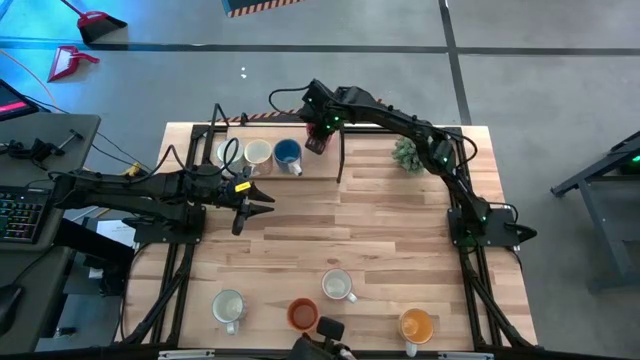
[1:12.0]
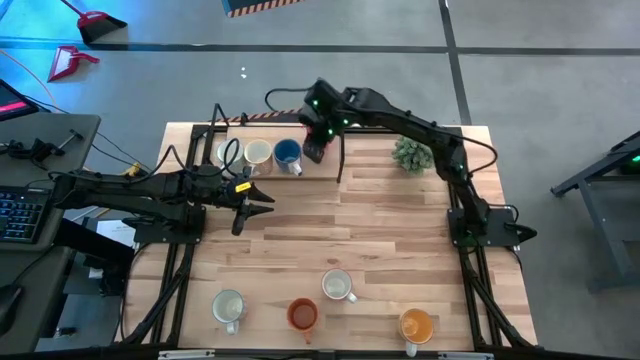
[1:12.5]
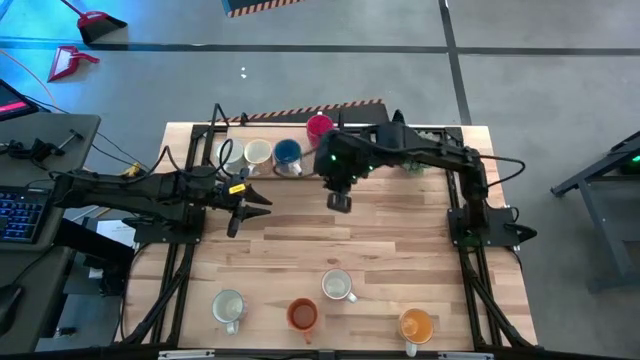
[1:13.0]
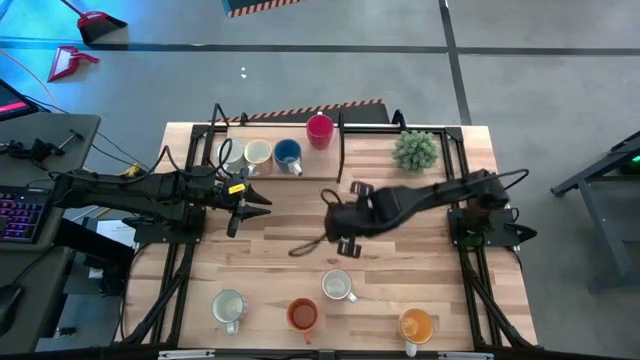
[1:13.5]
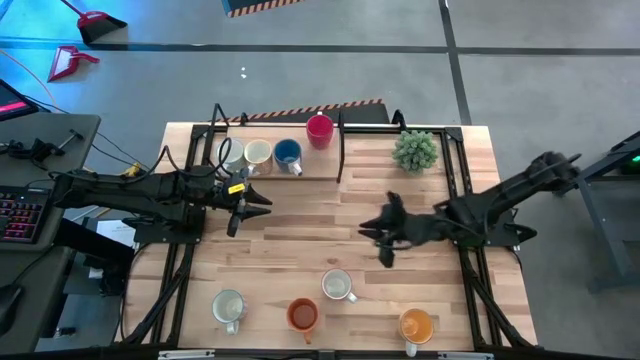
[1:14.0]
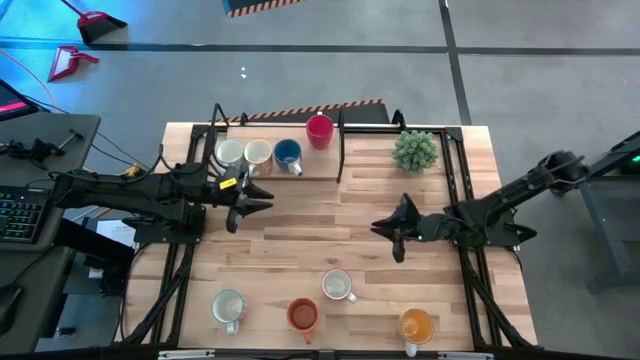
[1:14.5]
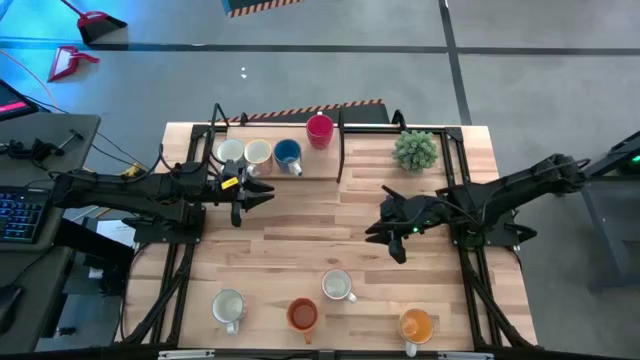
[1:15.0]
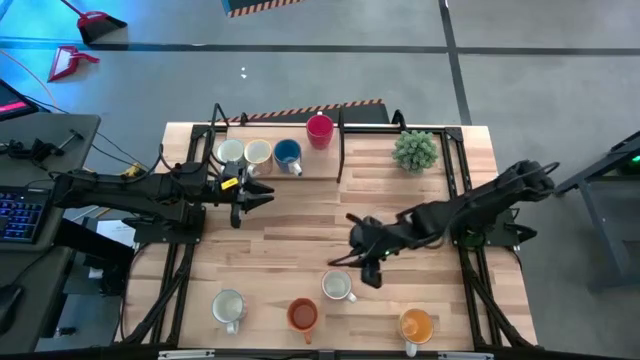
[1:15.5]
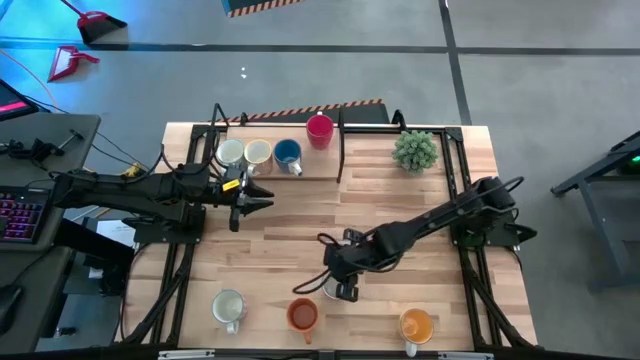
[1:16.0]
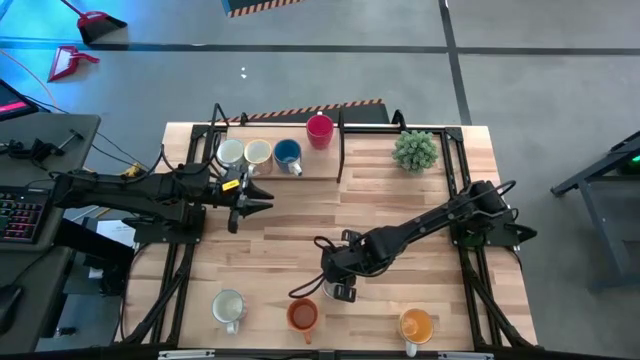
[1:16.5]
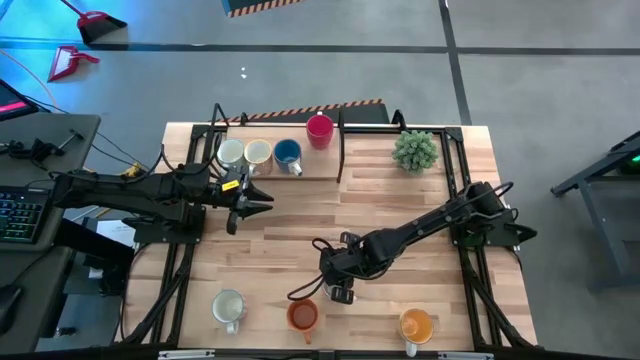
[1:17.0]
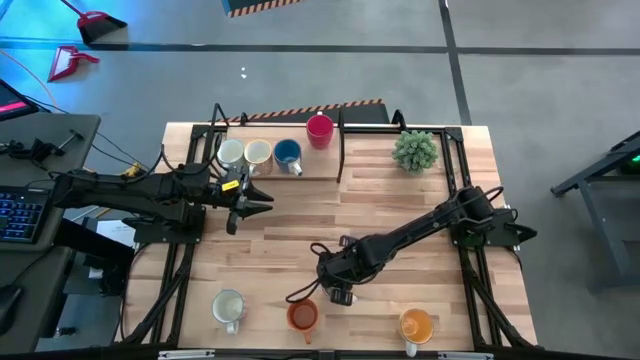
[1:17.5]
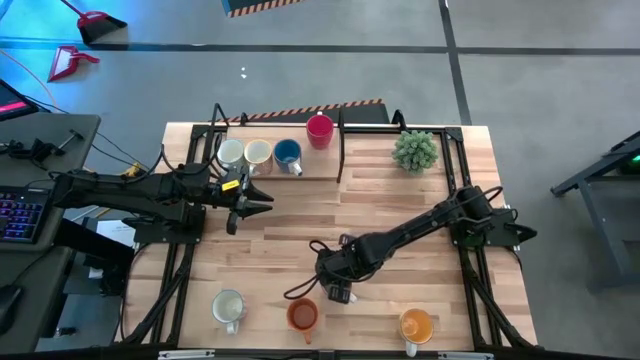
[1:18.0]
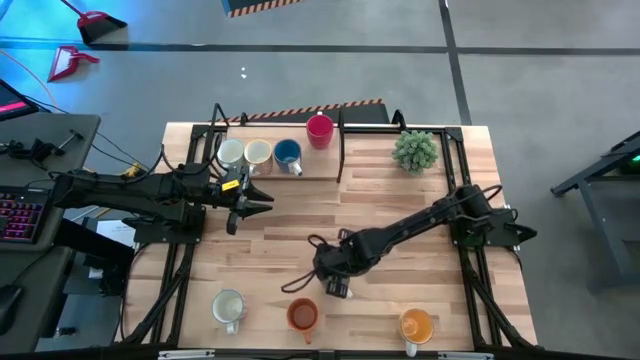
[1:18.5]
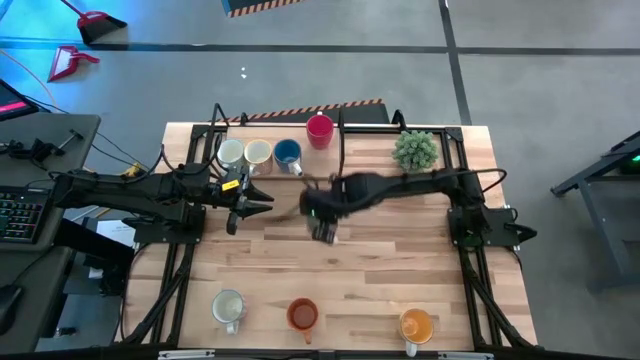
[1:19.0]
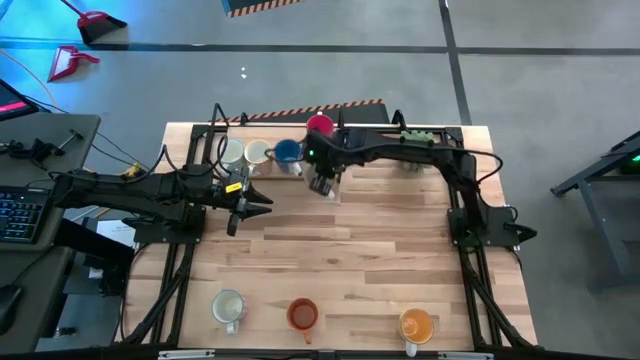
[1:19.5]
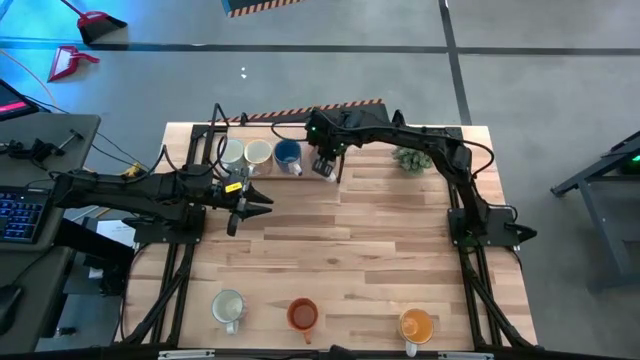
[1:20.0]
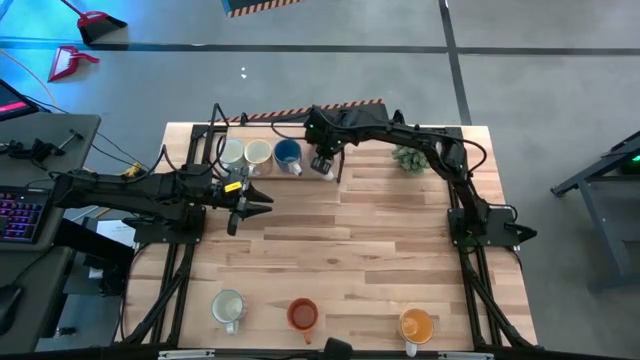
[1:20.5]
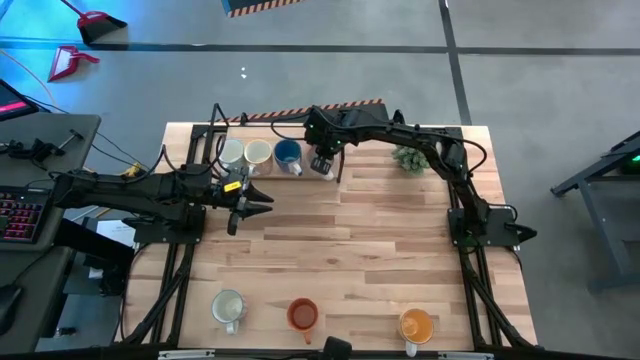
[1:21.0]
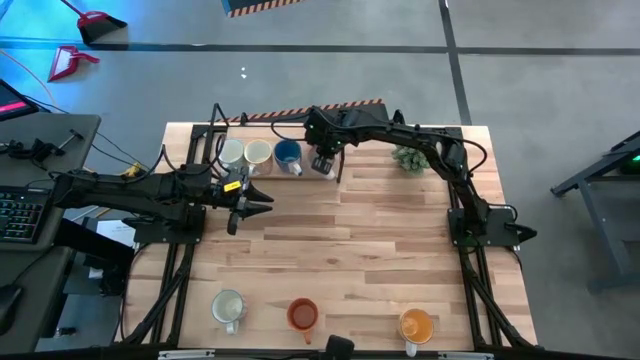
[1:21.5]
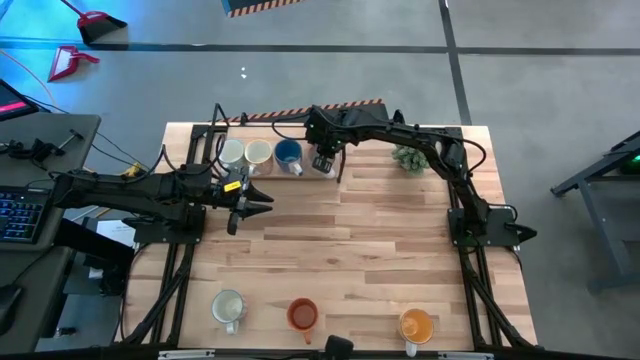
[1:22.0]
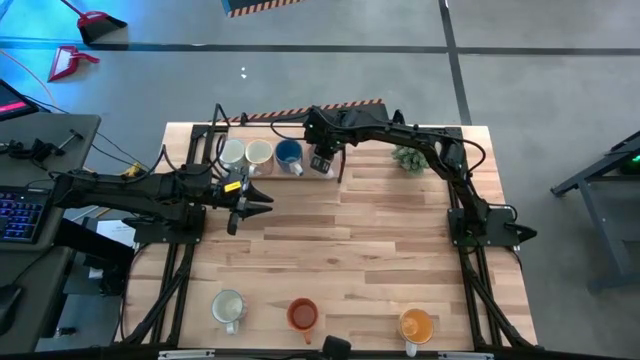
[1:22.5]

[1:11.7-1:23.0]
Task: Place coffee mugs
Put the gray patterned mug on the shelf

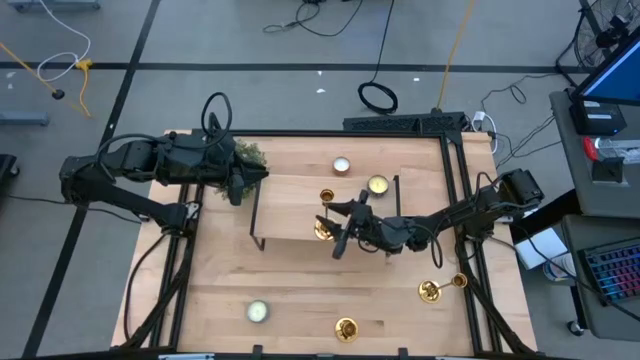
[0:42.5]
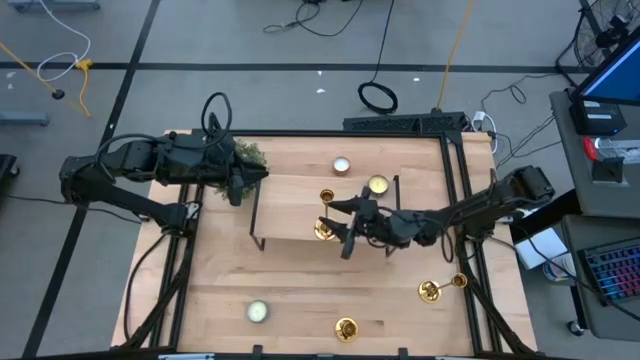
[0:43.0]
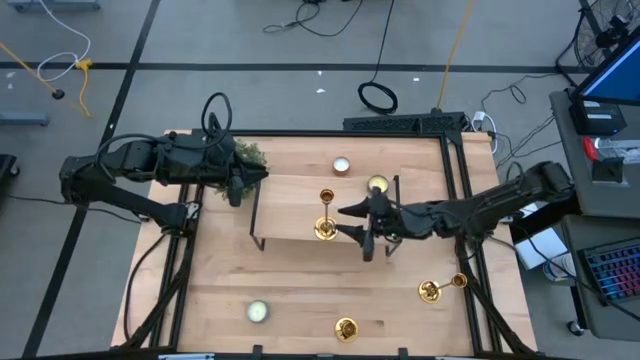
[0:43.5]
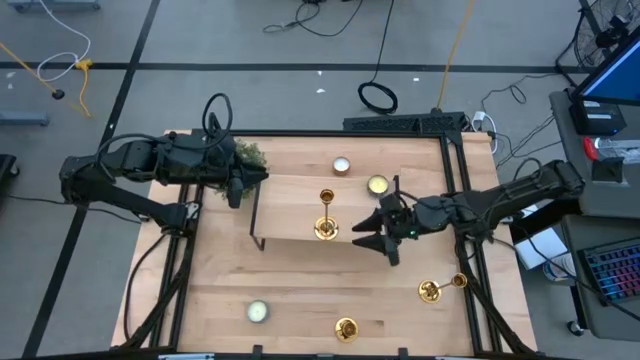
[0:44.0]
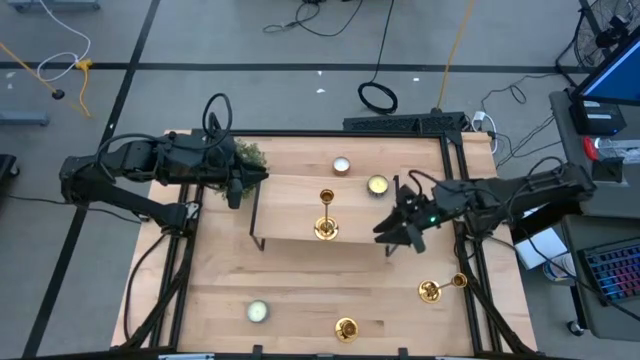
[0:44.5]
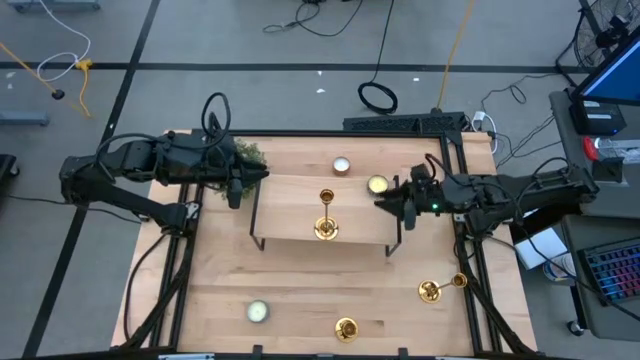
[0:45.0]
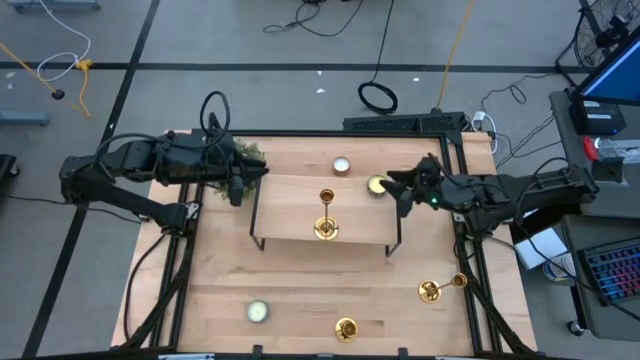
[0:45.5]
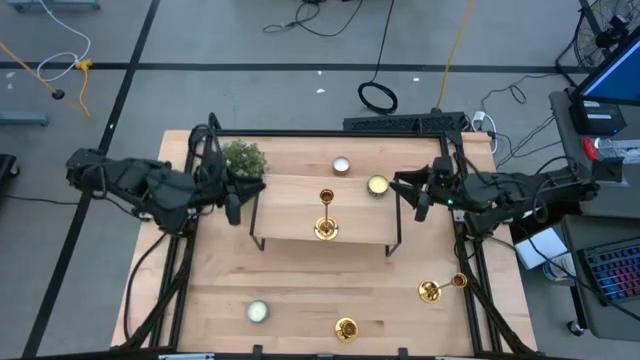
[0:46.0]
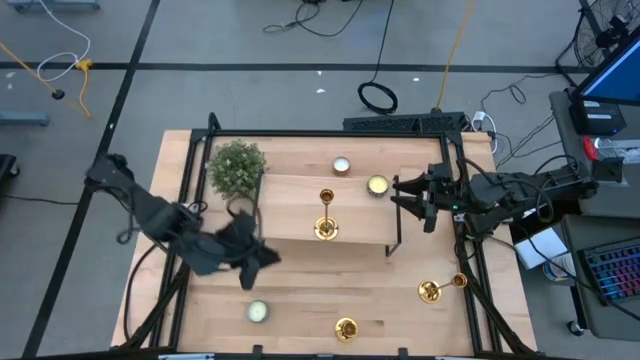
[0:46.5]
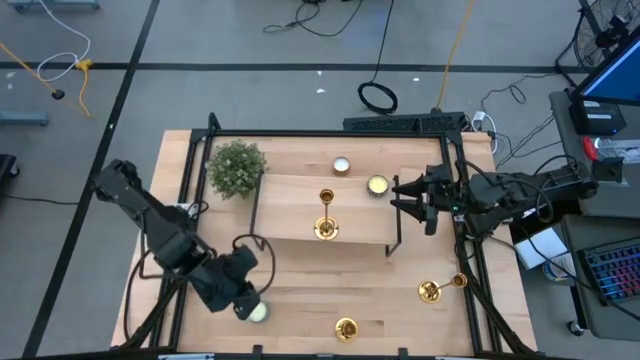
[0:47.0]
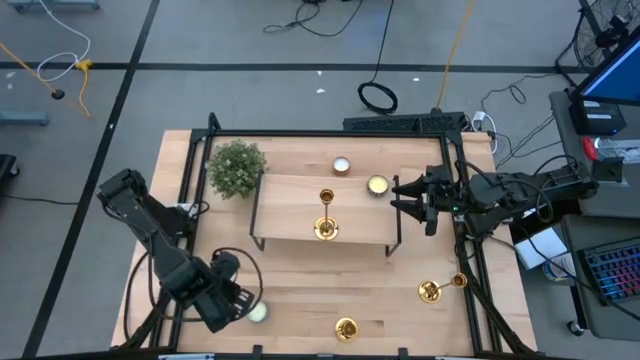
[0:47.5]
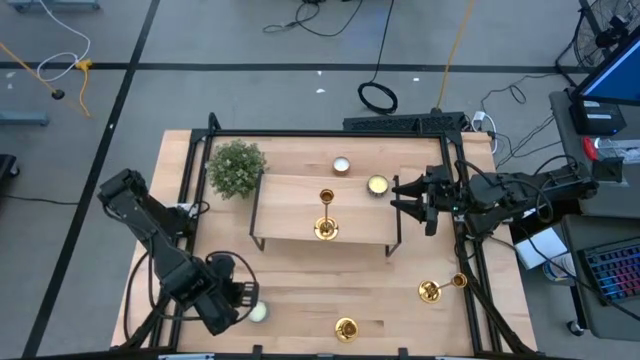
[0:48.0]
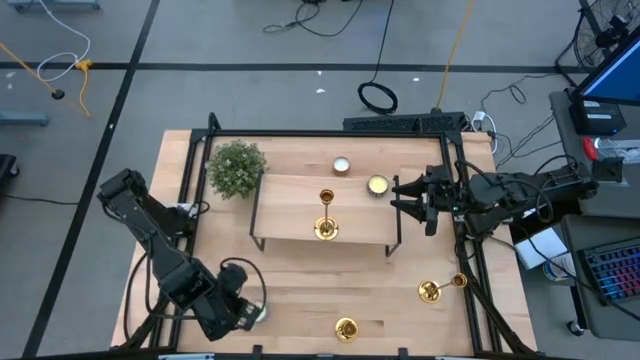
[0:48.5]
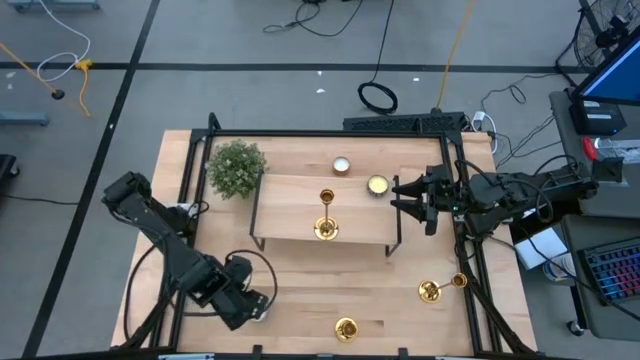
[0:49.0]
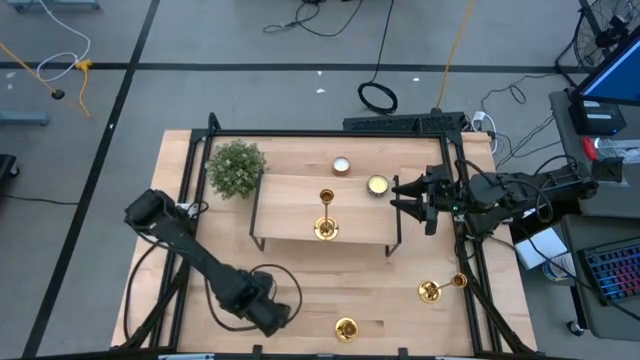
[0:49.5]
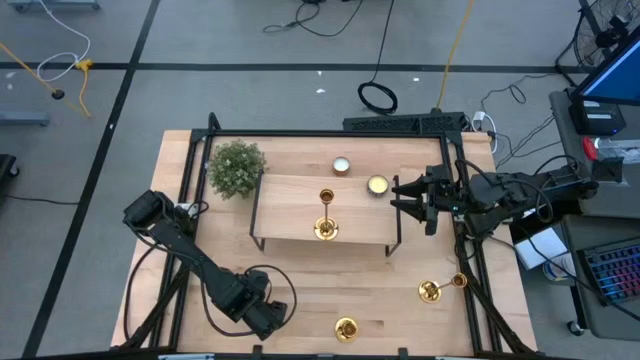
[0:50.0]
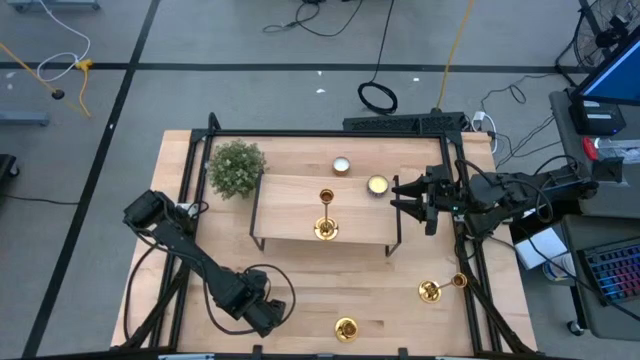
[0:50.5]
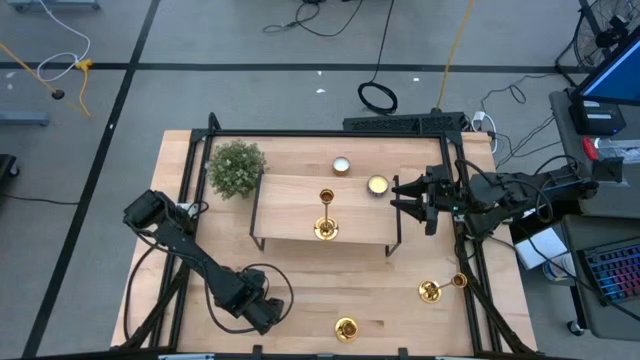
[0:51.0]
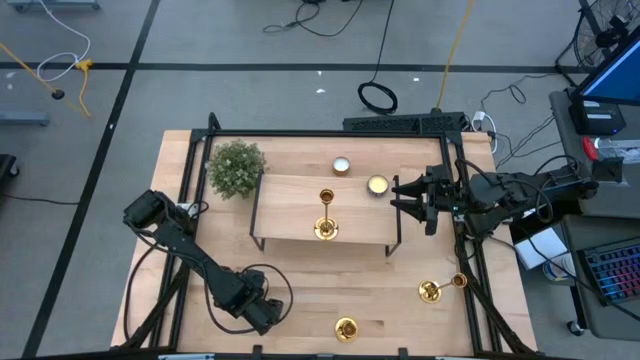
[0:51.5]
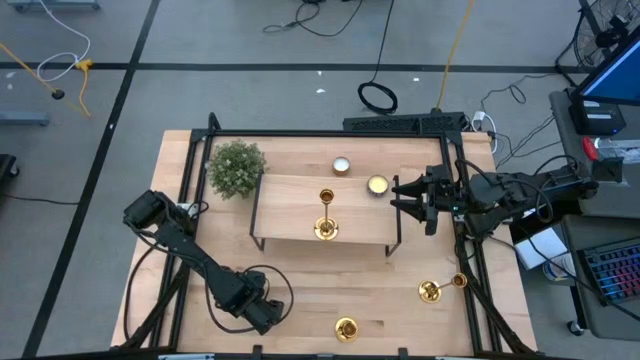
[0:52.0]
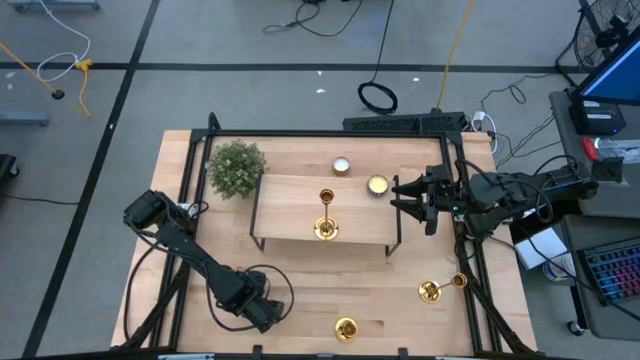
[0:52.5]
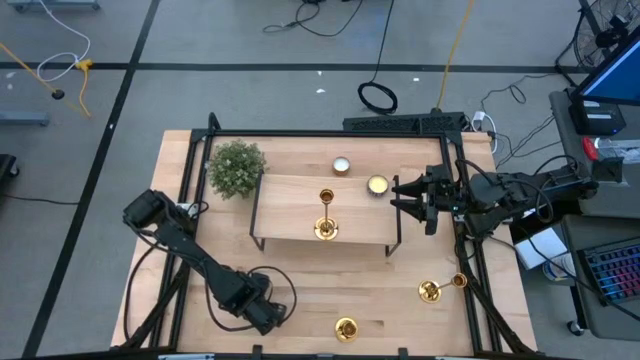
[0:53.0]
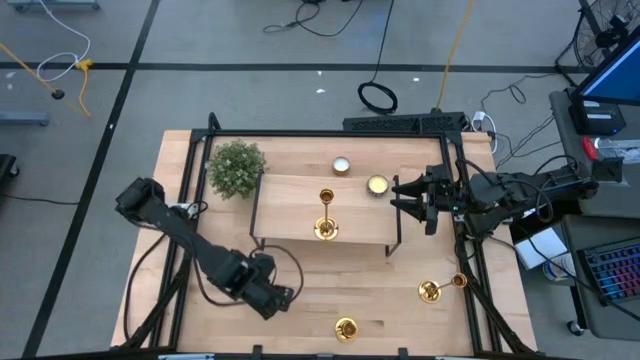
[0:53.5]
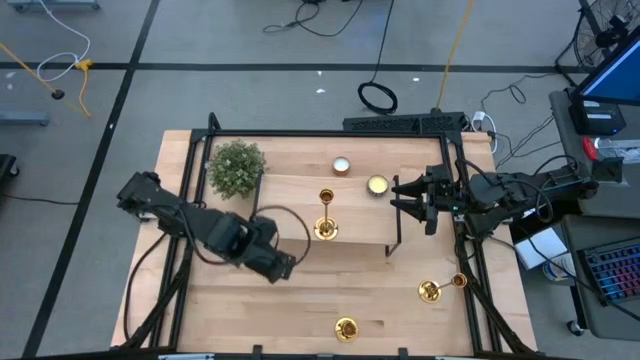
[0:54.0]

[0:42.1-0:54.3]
Task: Pick & Place candle stick holders
Put the bottom scented candle on the shelf
